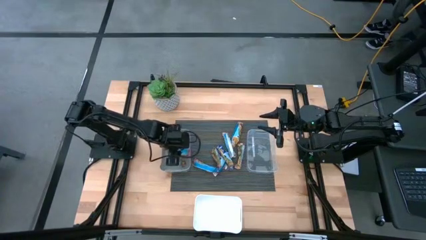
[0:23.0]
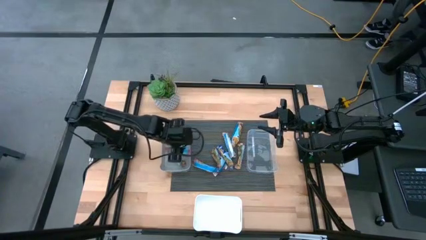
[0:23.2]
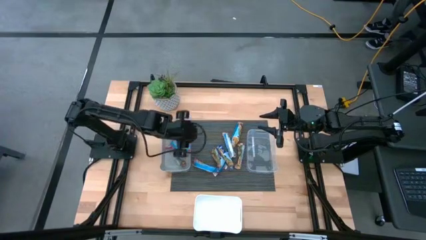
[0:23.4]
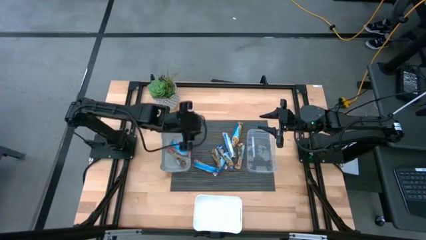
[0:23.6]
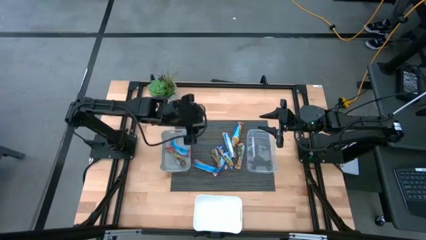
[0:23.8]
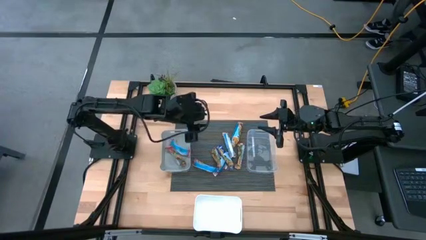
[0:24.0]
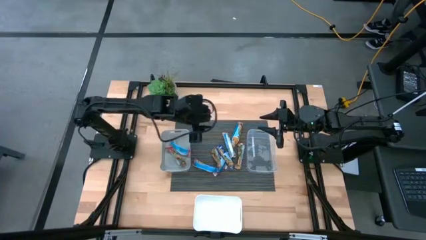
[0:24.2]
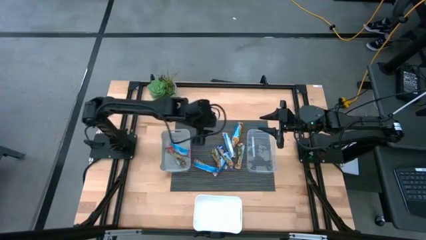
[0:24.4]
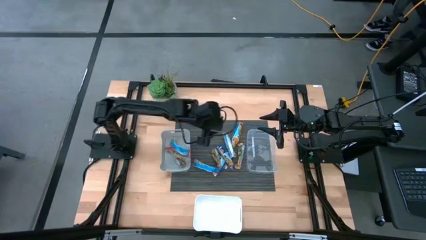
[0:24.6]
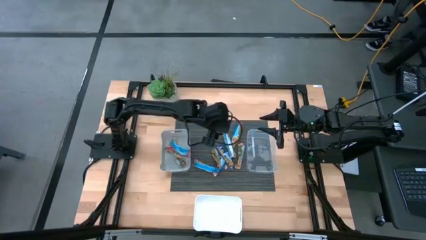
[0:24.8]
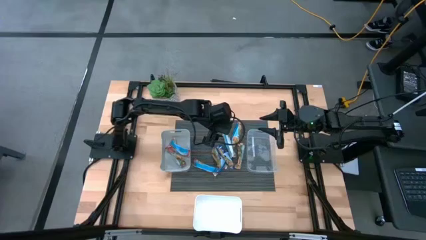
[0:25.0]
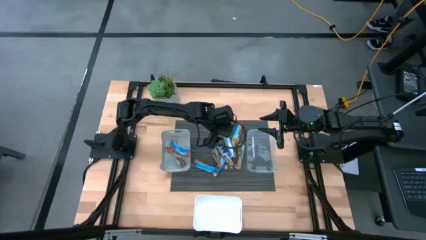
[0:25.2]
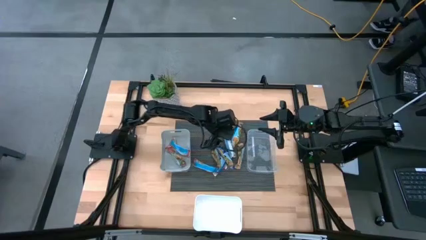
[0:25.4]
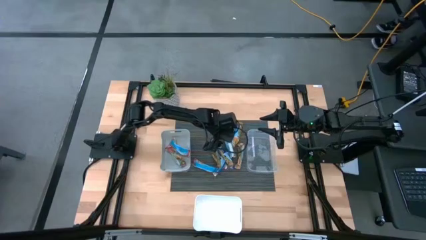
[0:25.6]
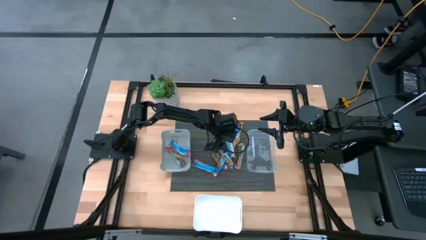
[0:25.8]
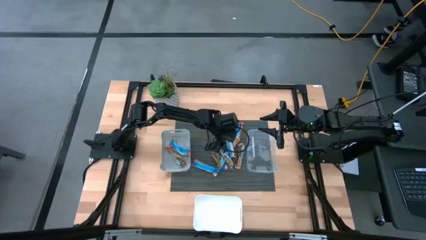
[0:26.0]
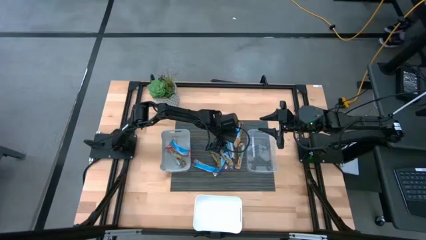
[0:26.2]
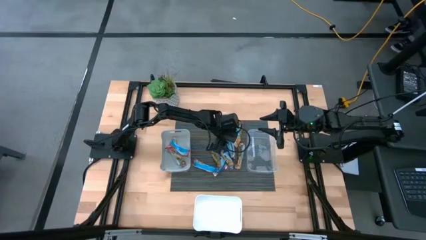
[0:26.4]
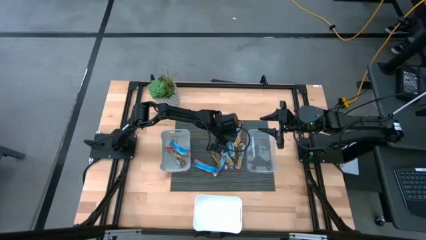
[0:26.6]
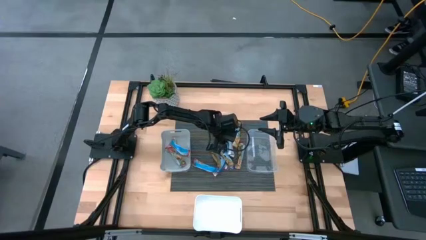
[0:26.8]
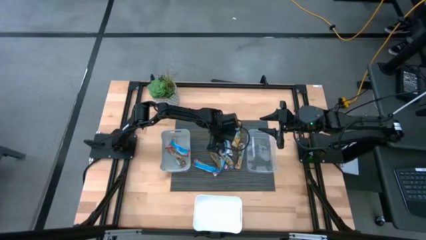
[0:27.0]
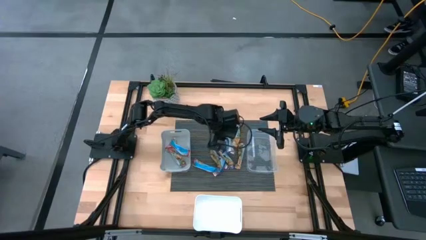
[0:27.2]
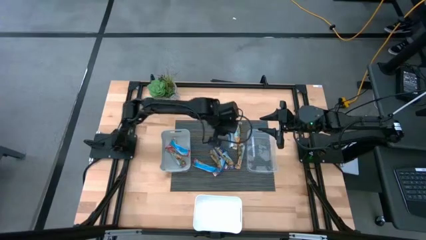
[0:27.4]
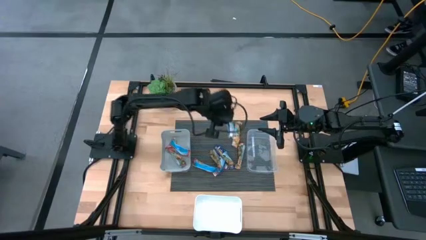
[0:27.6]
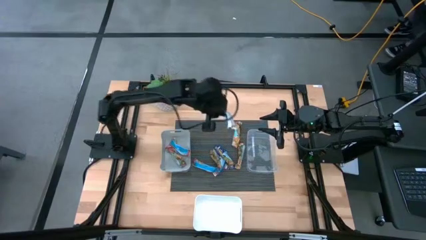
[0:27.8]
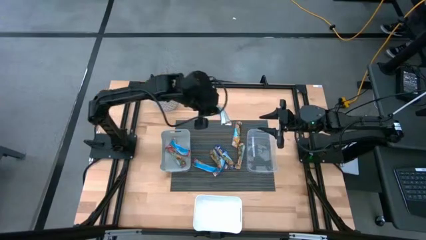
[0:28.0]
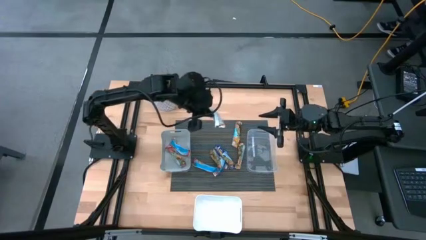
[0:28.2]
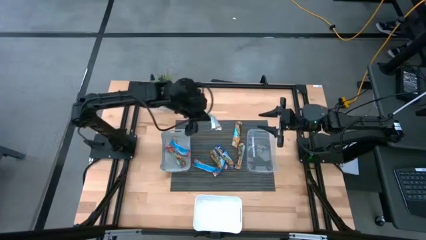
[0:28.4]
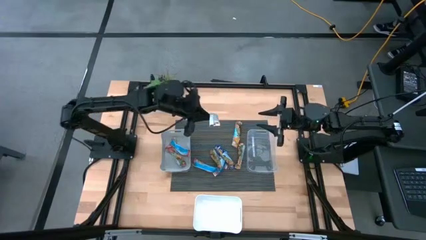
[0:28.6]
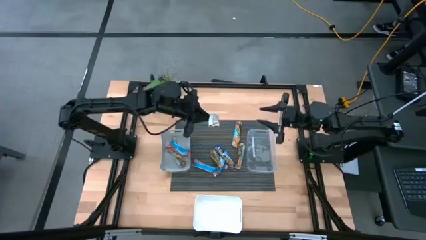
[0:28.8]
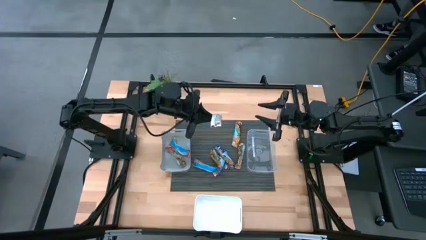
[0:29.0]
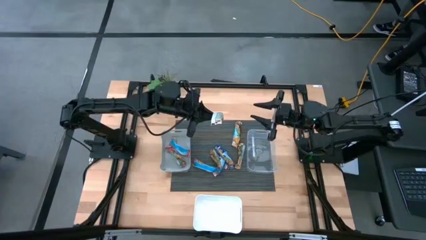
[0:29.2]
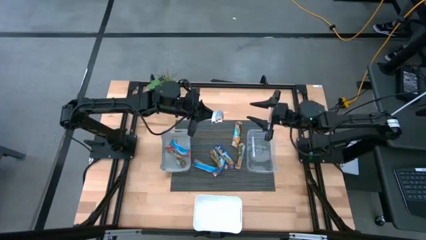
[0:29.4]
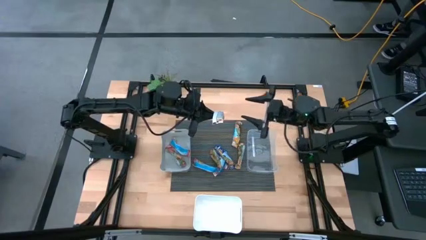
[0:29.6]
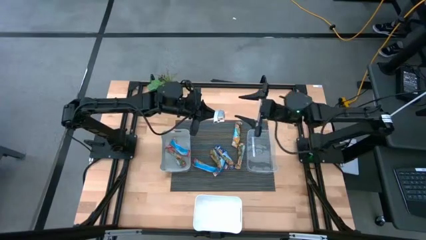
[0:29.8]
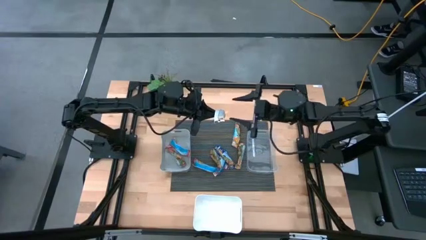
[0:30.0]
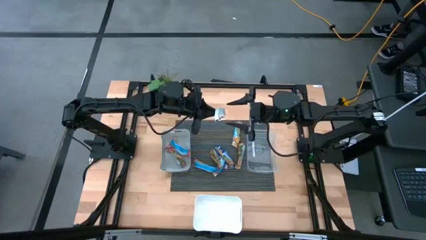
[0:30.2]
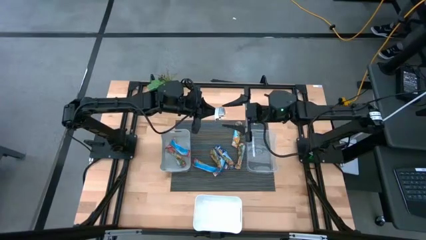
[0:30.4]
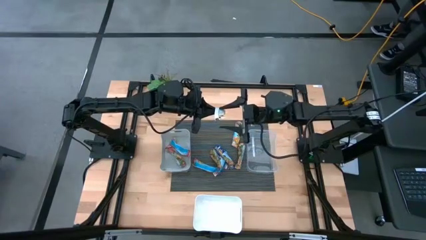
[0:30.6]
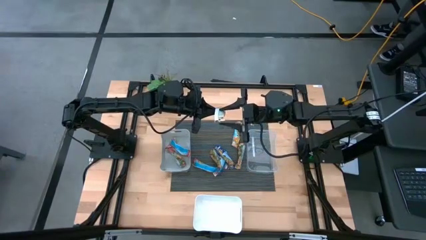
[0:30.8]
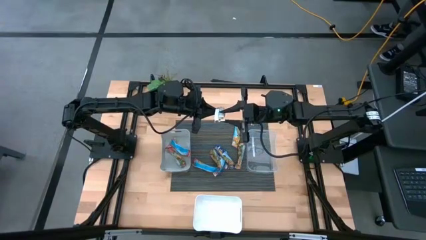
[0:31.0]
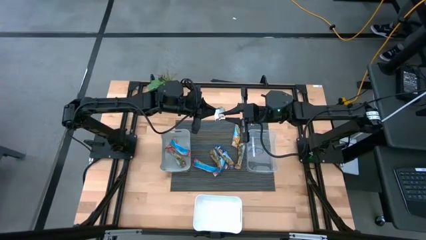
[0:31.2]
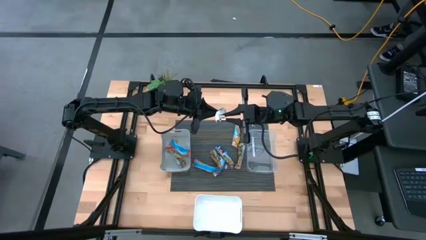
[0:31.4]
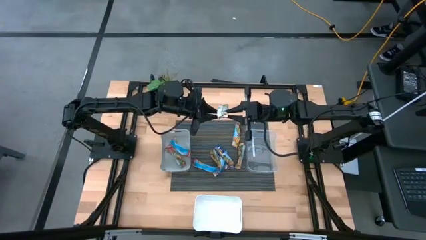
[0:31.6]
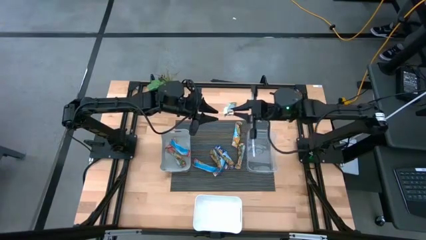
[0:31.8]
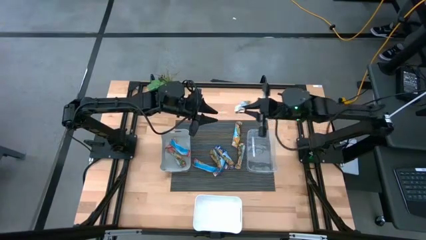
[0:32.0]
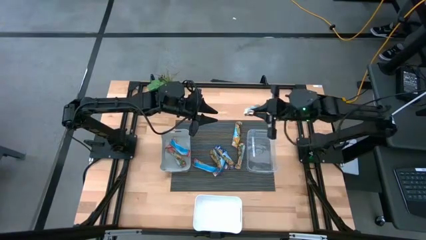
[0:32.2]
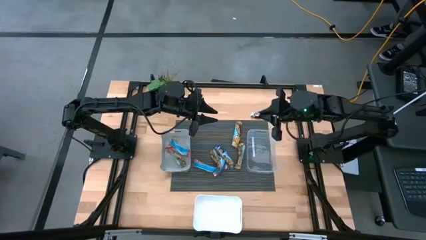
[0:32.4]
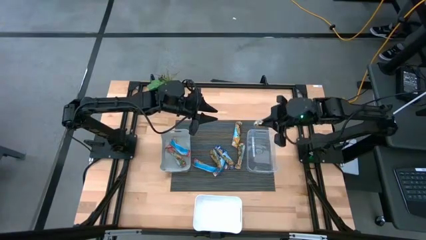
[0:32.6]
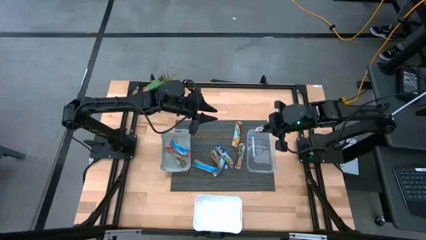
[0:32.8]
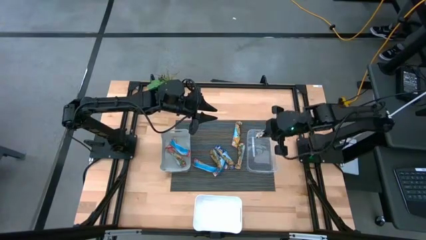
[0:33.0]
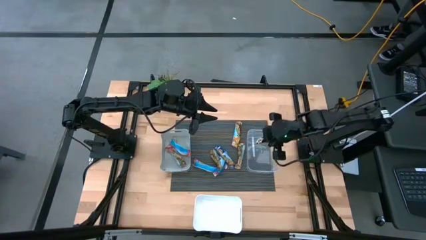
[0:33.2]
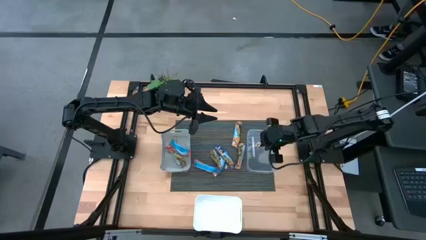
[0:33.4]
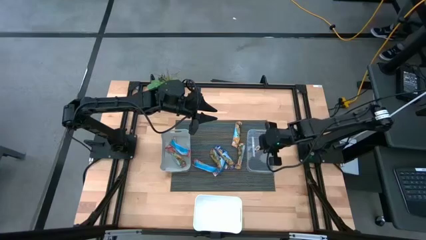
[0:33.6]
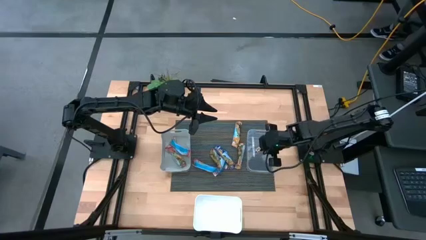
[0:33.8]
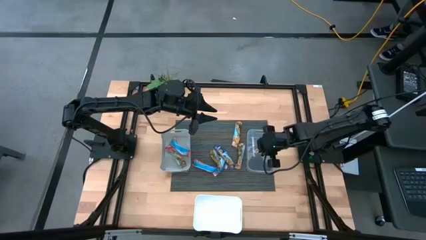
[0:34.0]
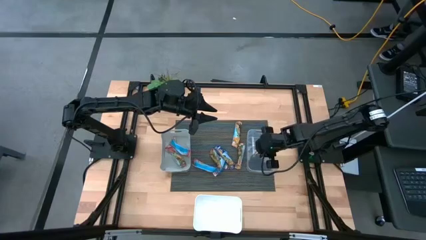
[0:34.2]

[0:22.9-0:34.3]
Task: Pick and place Granola Bars by type
Put the yellow granola bar into the transparent bin
